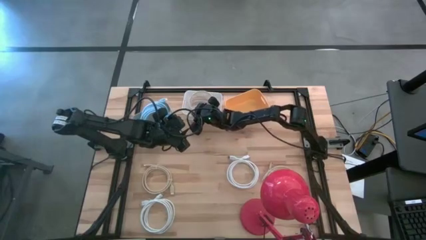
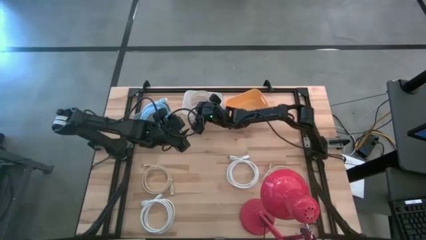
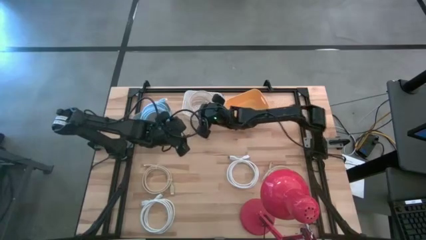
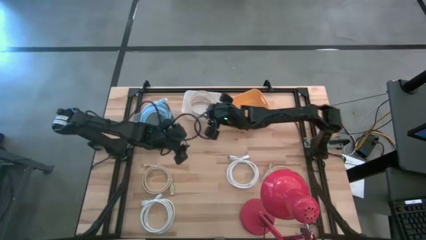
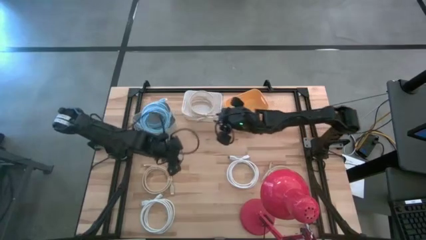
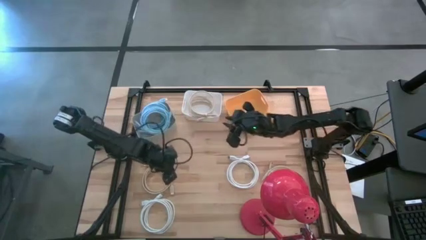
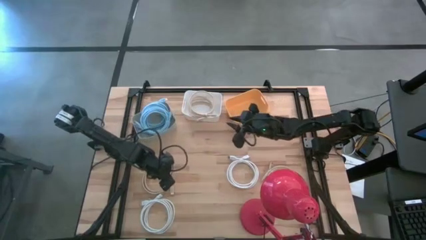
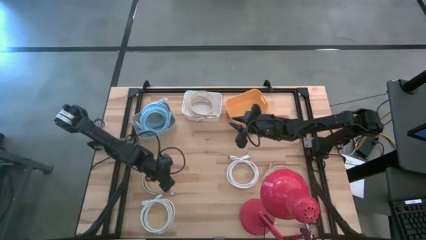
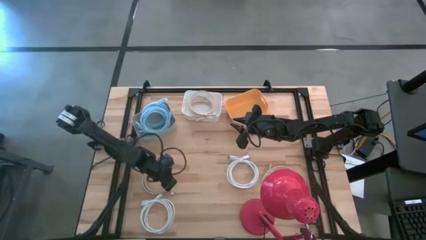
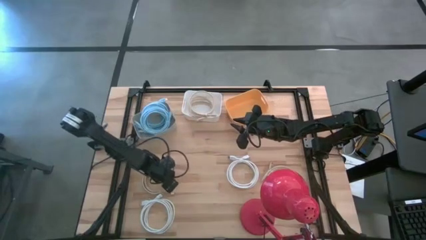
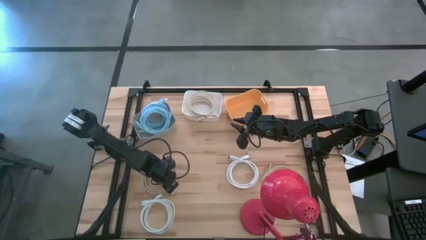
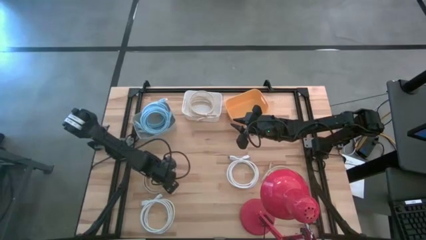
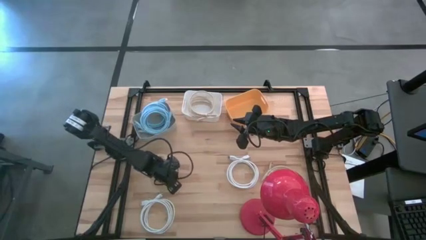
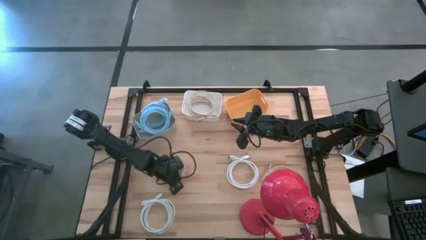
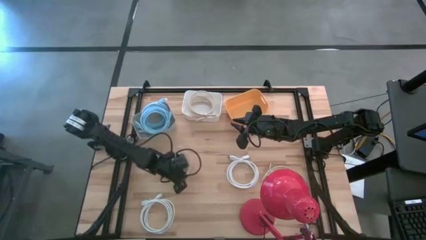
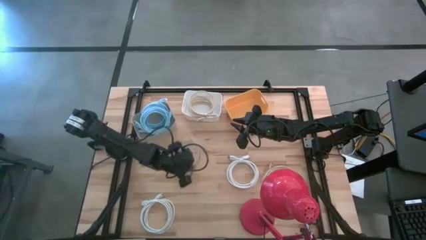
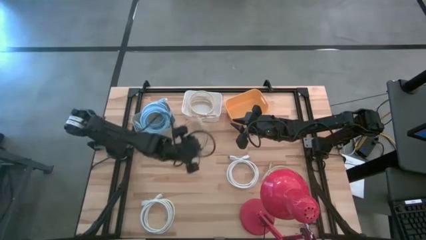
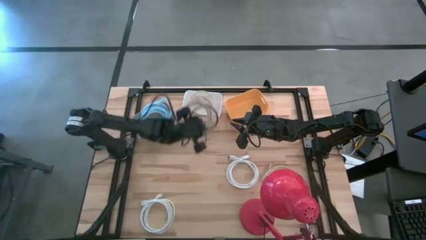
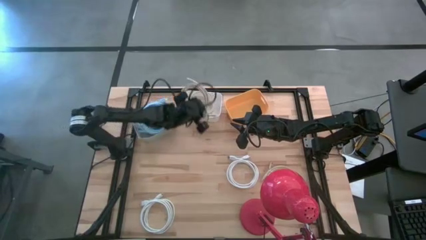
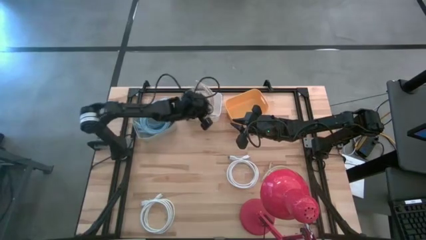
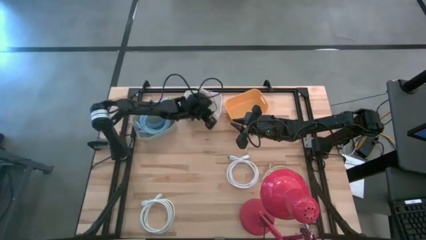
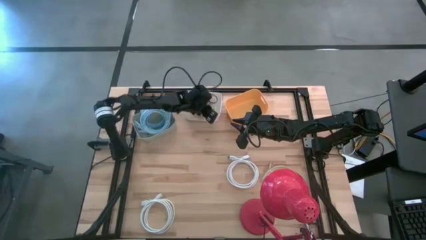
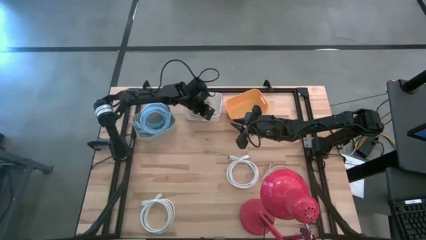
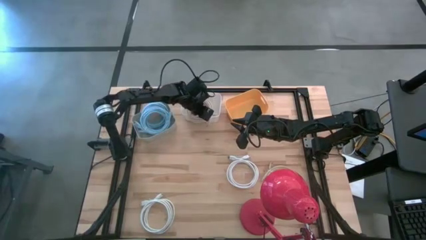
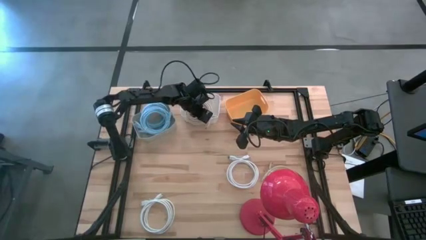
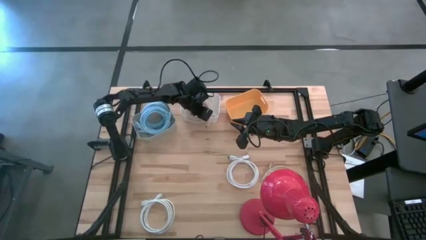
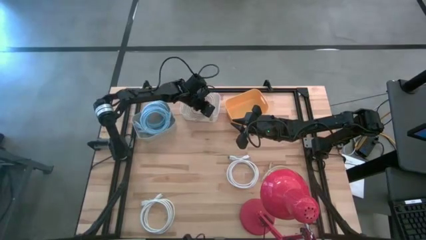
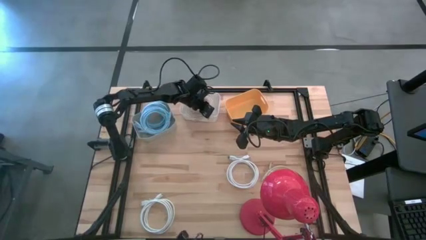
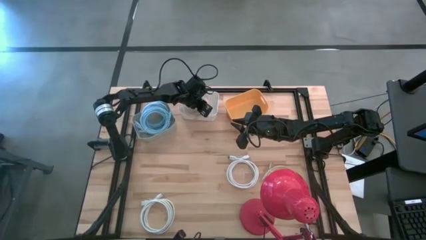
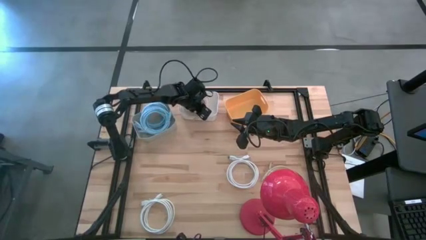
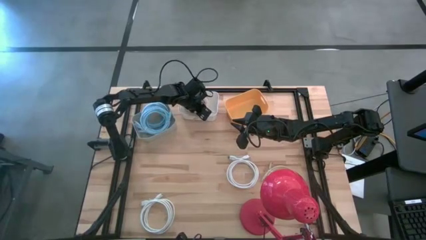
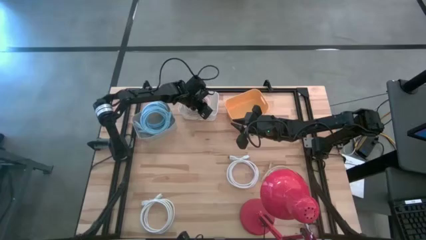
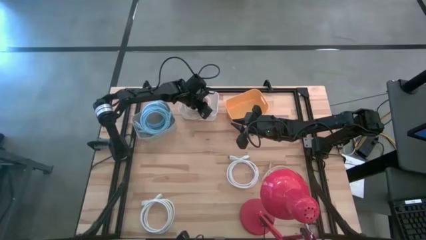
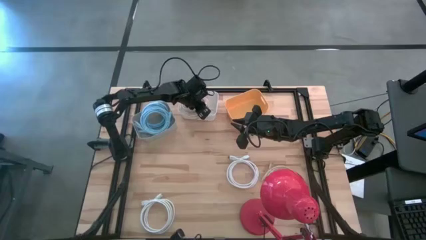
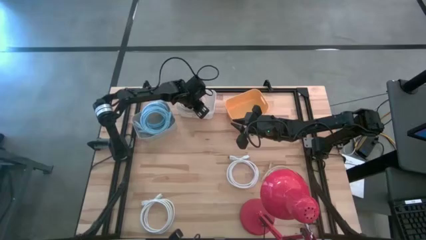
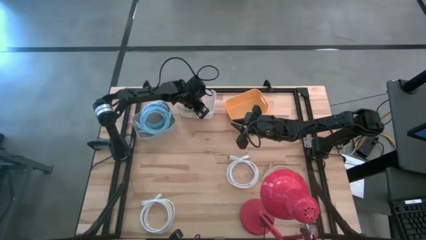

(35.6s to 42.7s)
Task: Pick & Place USB Port
Put the bottom left brown USB cable into the white bin

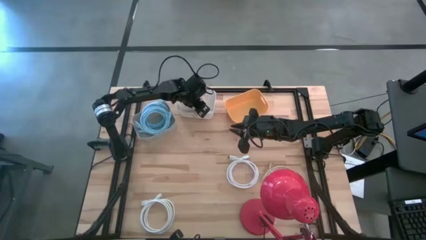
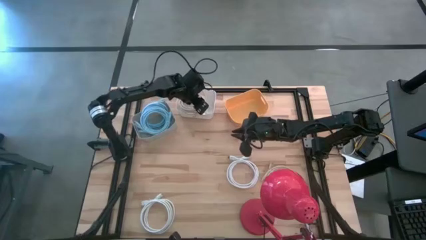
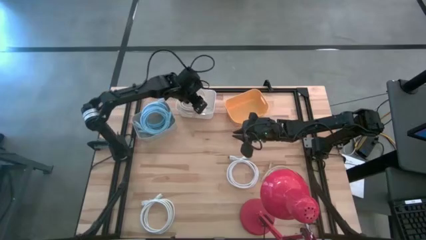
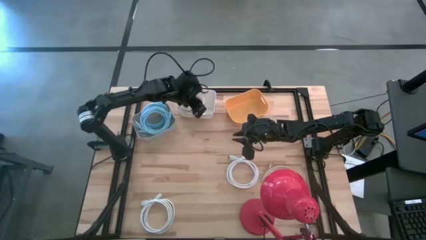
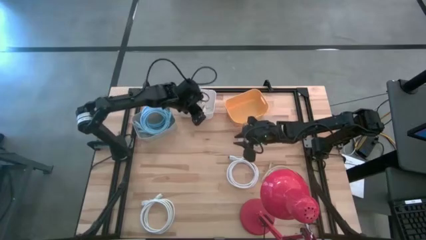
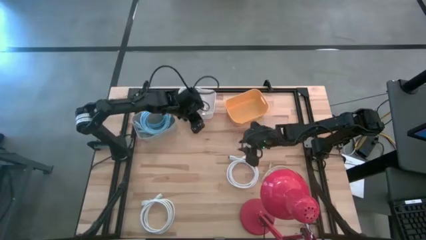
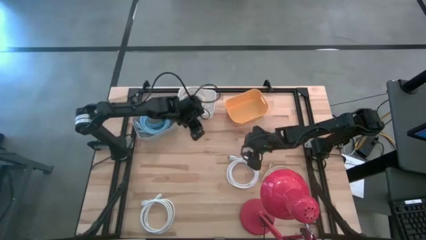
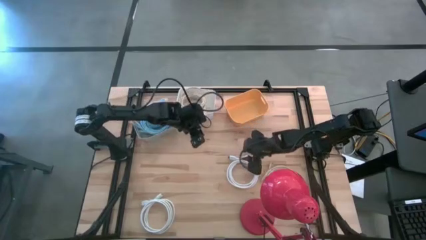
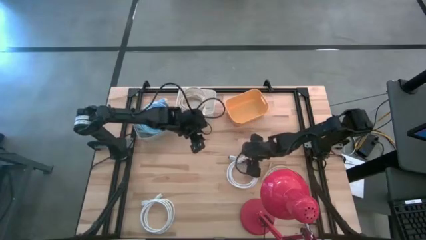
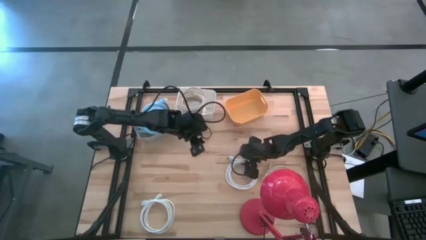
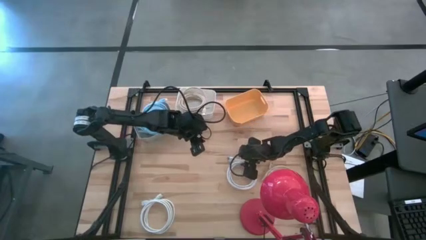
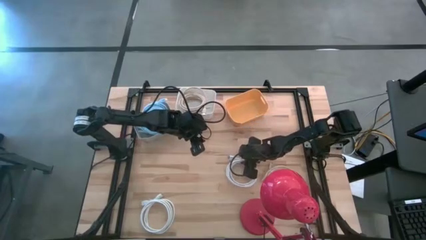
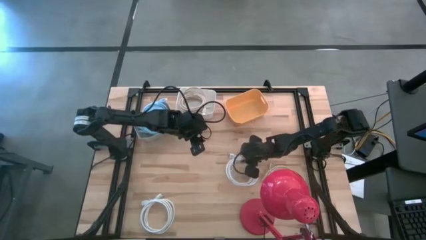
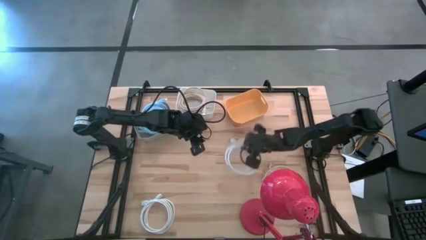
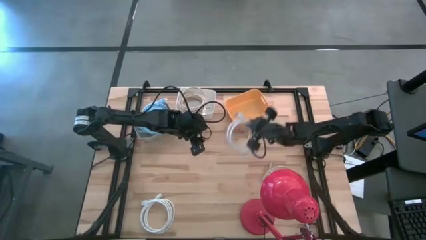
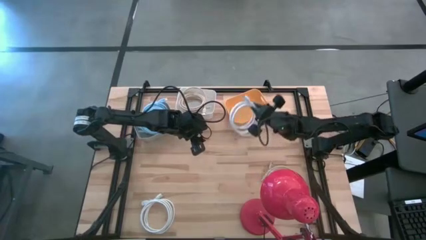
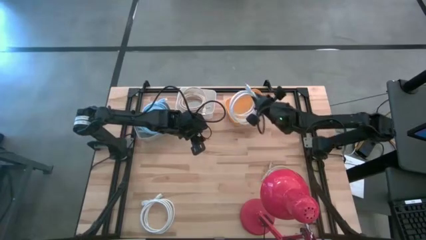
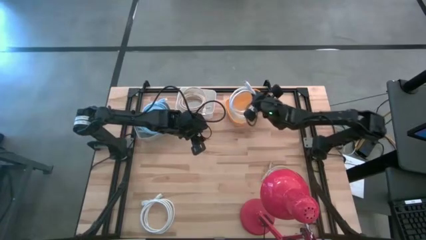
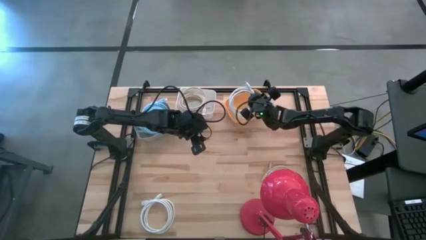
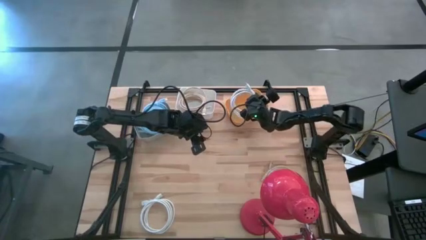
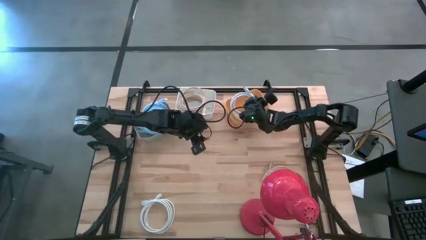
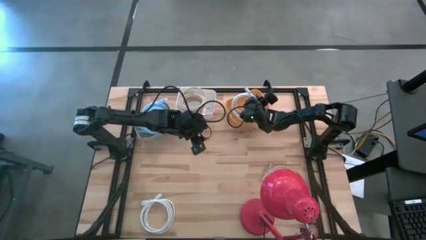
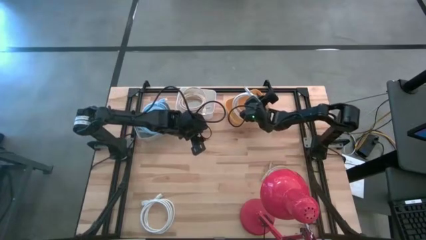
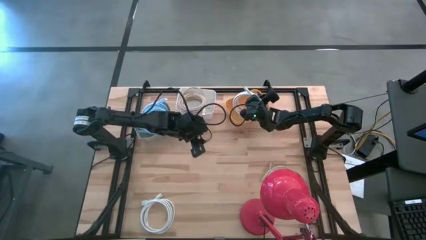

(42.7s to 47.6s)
Put the top white USB cable into the yellow bin
